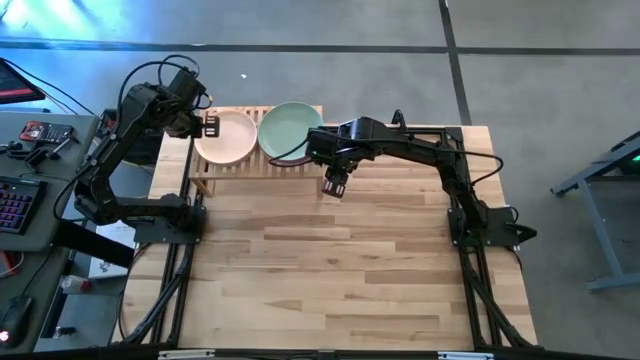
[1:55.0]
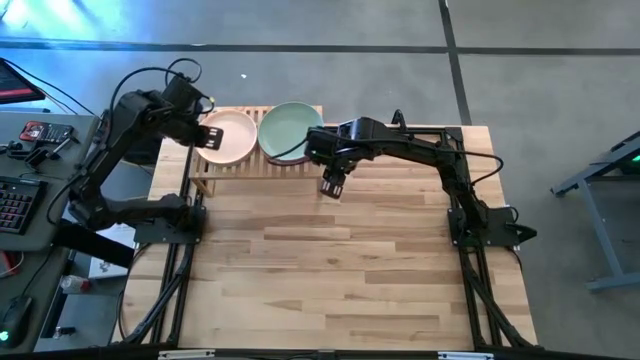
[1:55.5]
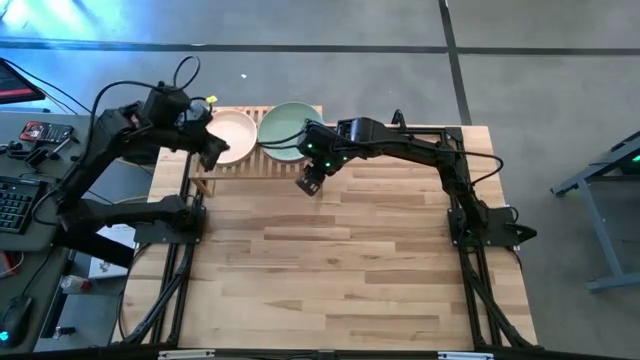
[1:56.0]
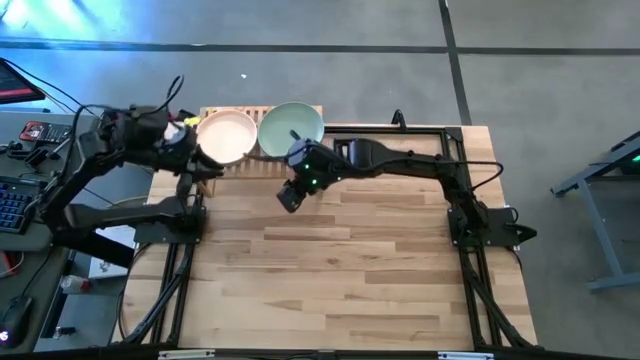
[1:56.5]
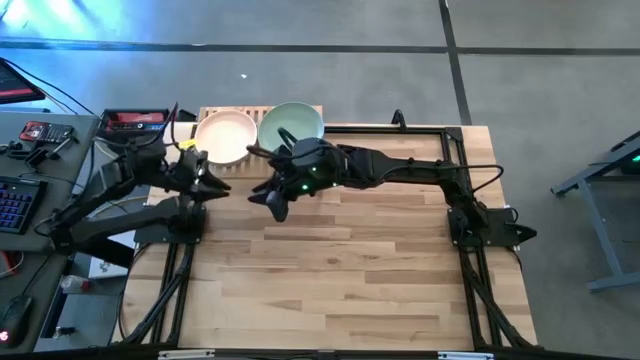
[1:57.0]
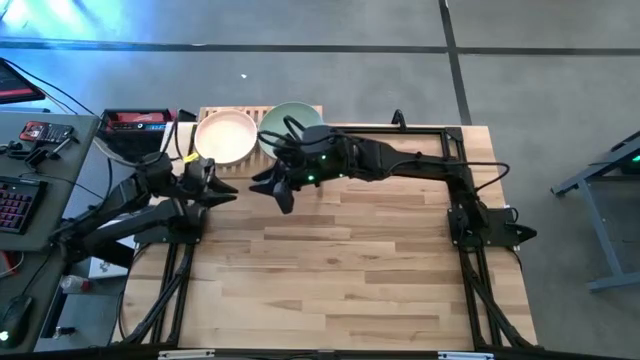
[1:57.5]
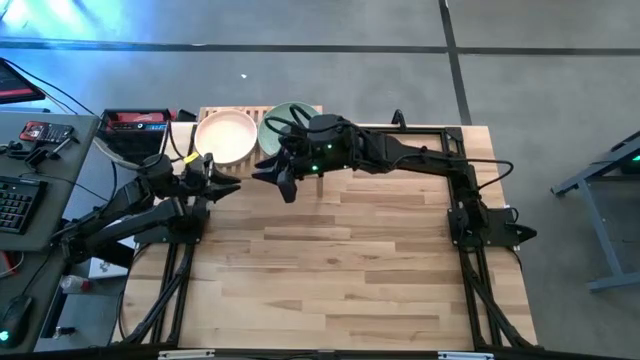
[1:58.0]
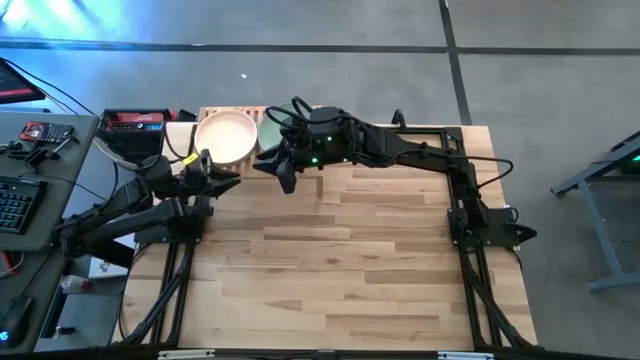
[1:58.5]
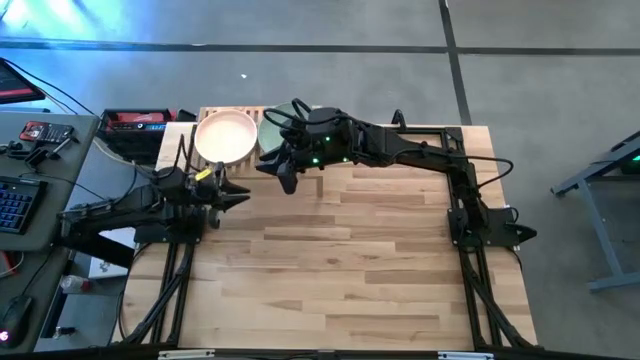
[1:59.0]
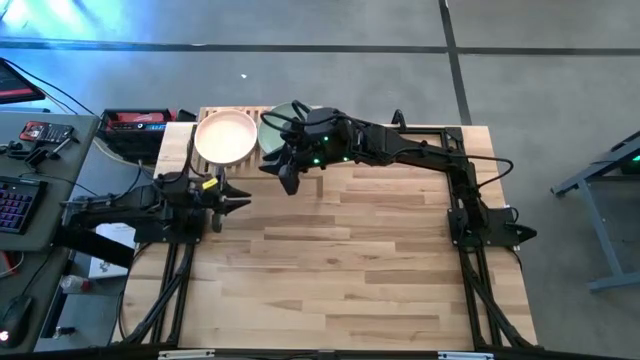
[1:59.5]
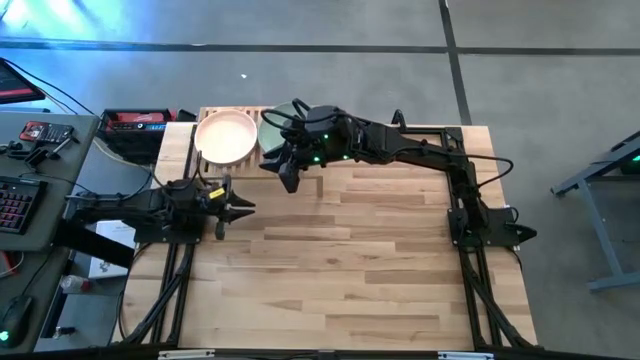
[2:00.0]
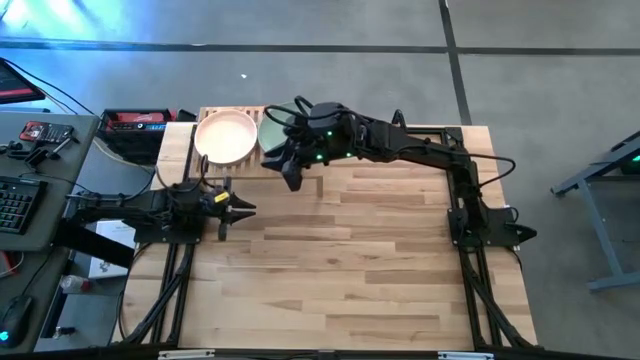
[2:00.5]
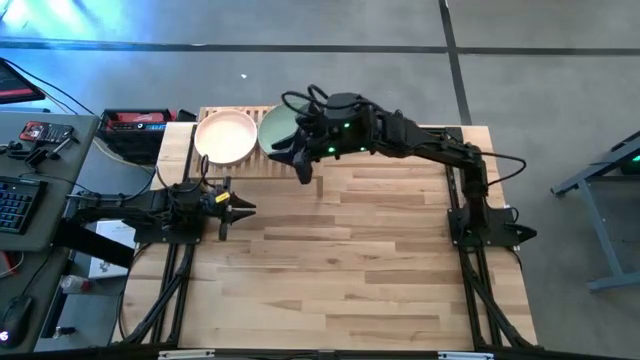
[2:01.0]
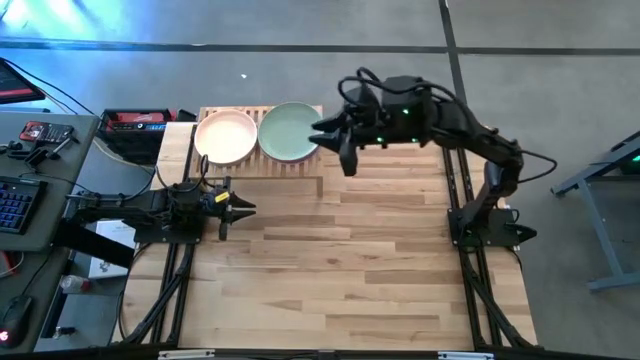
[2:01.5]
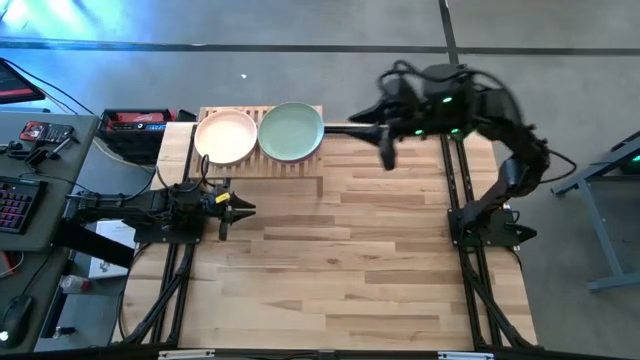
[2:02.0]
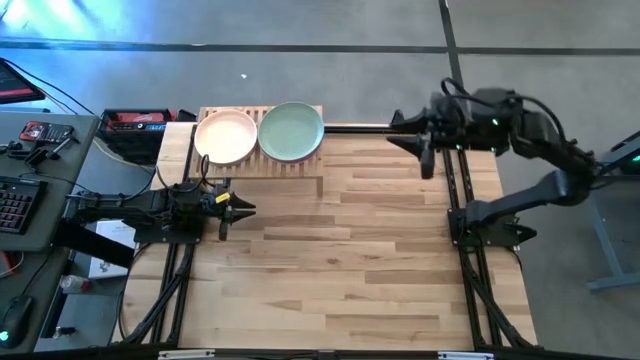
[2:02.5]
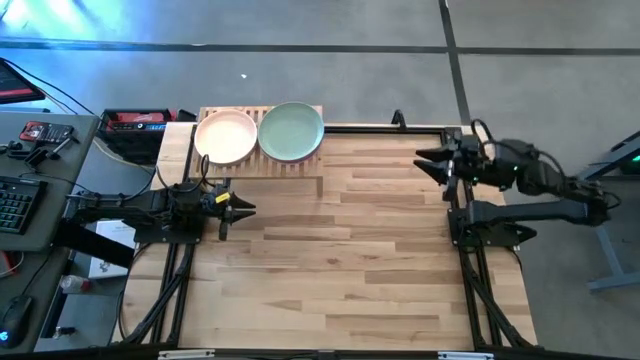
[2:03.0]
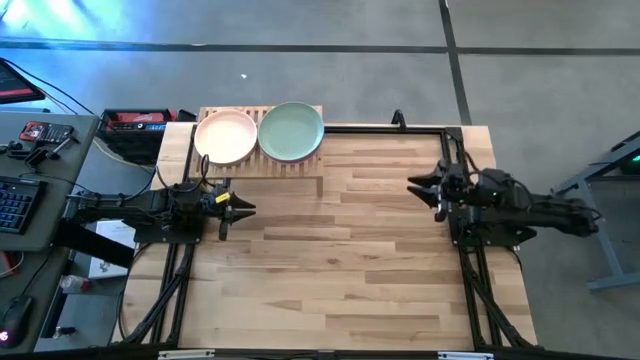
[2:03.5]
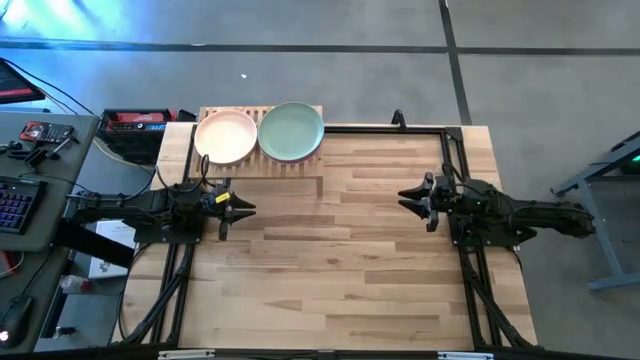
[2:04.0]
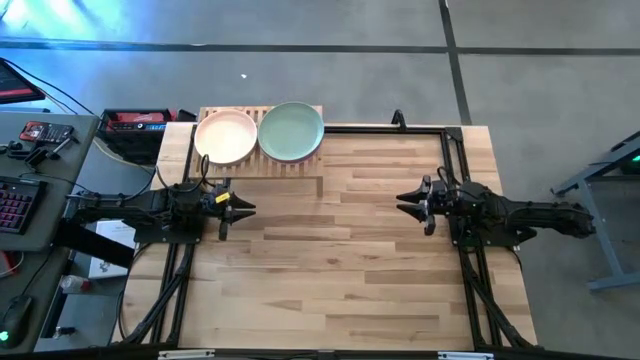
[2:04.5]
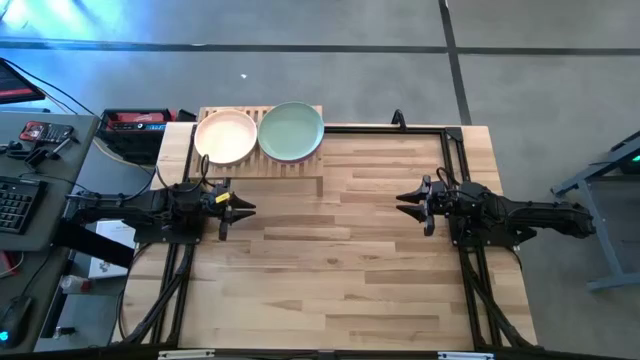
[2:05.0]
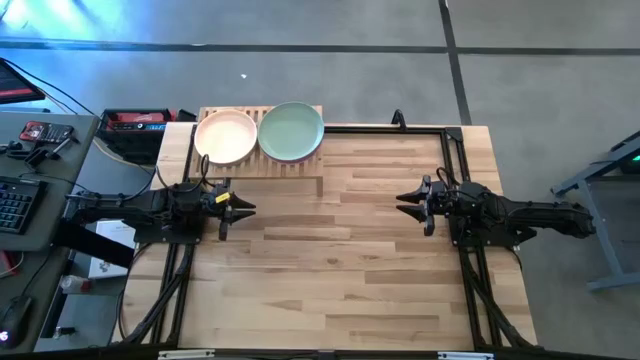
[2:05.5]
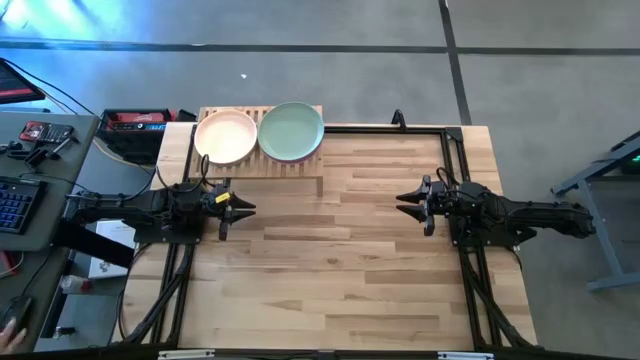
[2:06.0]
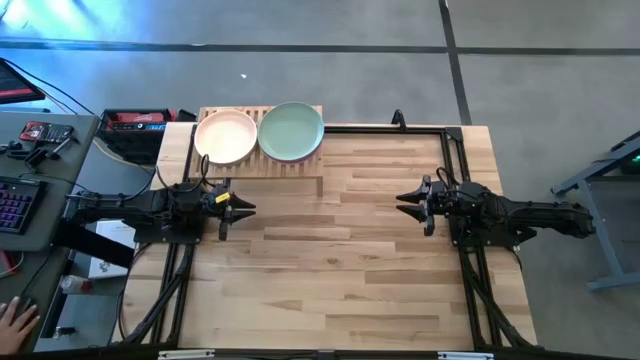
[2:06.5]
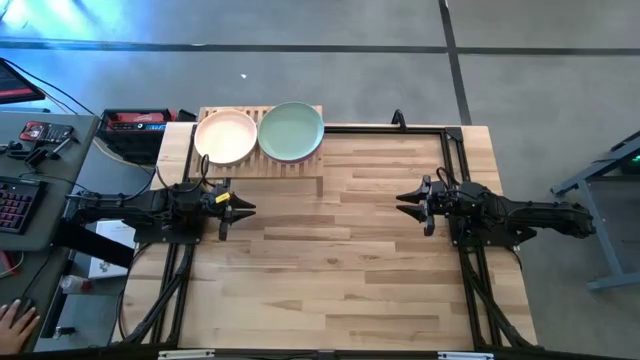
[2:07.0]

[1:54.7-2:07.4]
Task: Place and stack plates onto a shelf
Return to Home Position

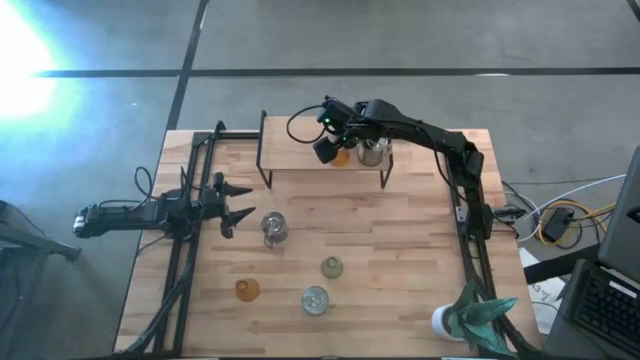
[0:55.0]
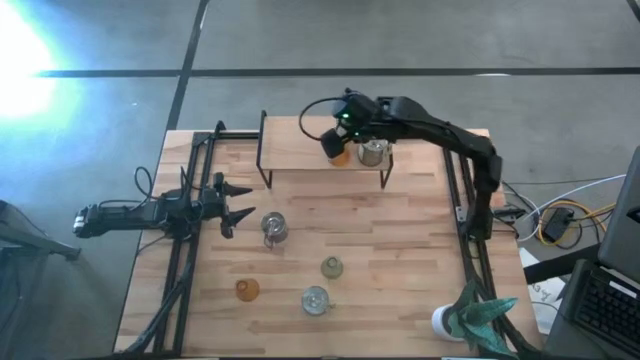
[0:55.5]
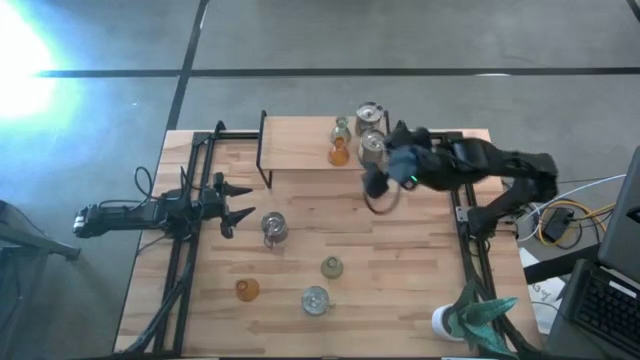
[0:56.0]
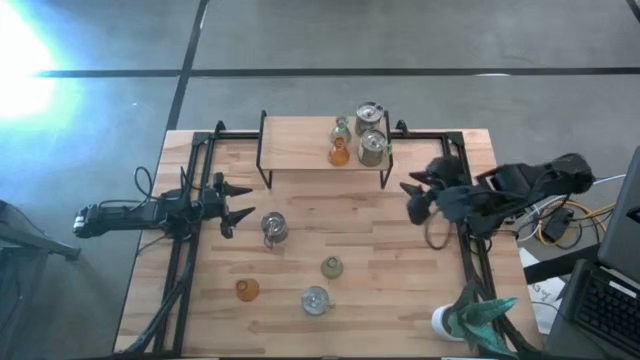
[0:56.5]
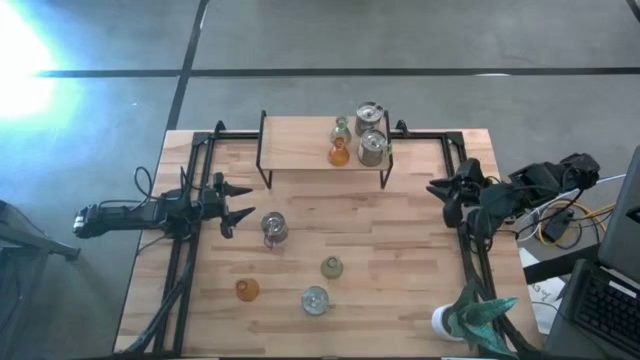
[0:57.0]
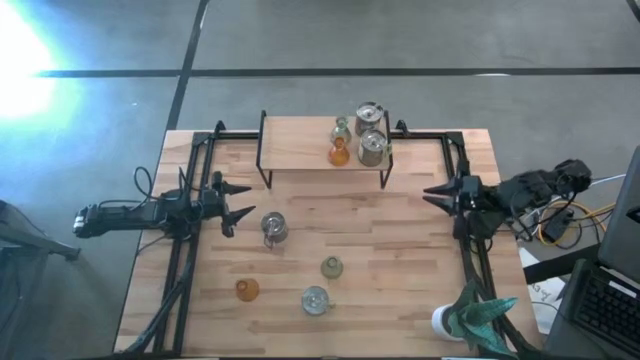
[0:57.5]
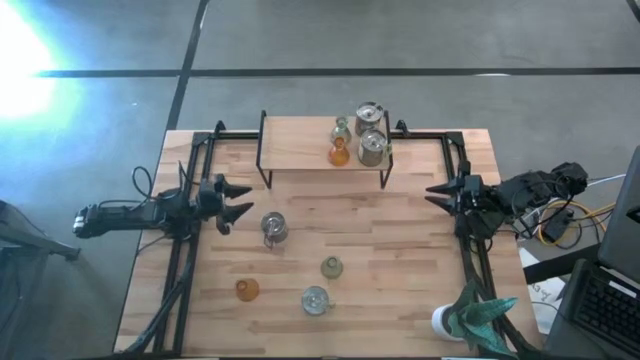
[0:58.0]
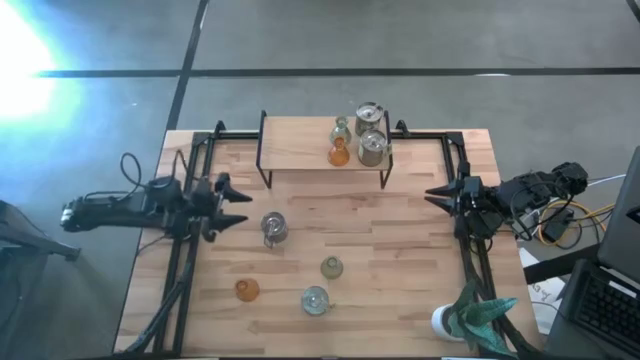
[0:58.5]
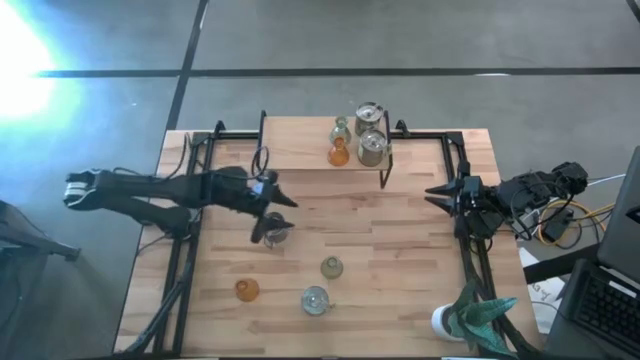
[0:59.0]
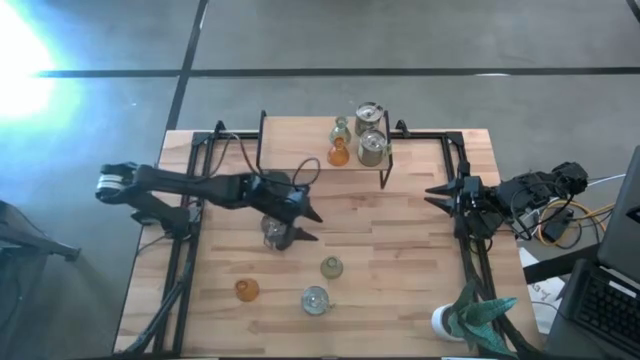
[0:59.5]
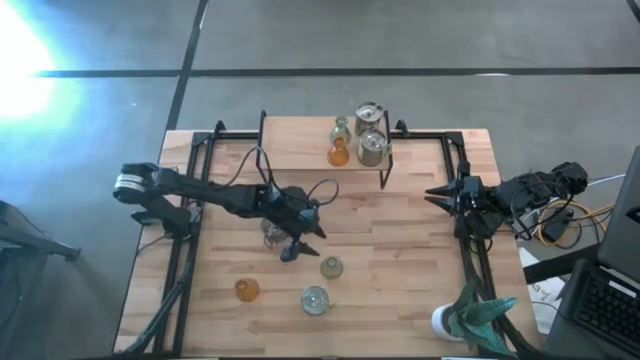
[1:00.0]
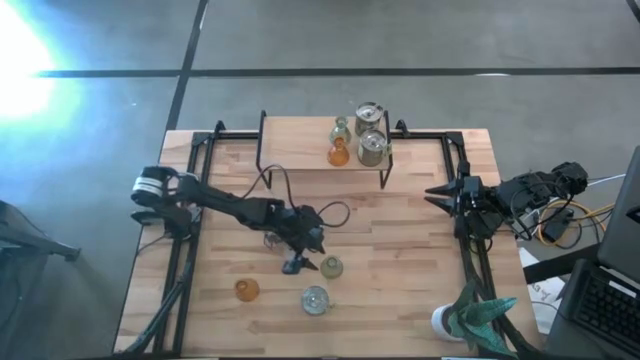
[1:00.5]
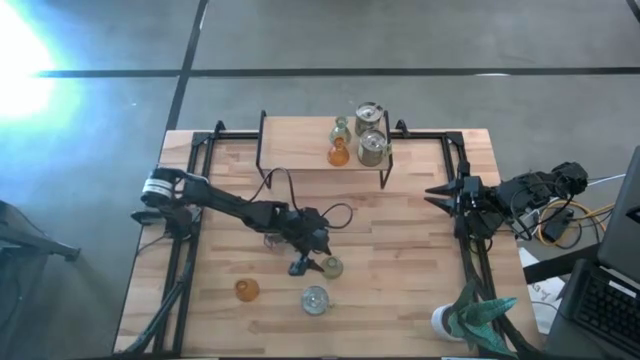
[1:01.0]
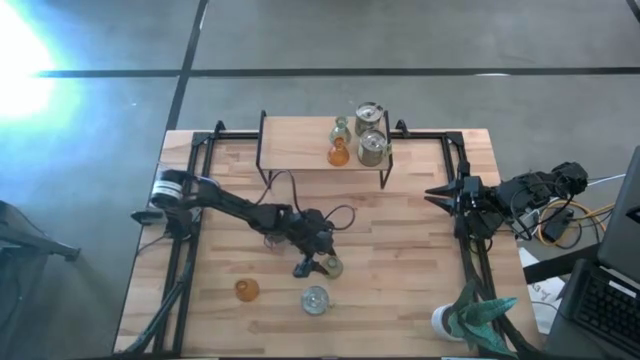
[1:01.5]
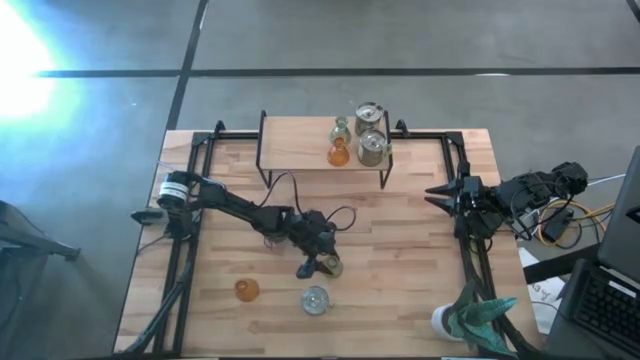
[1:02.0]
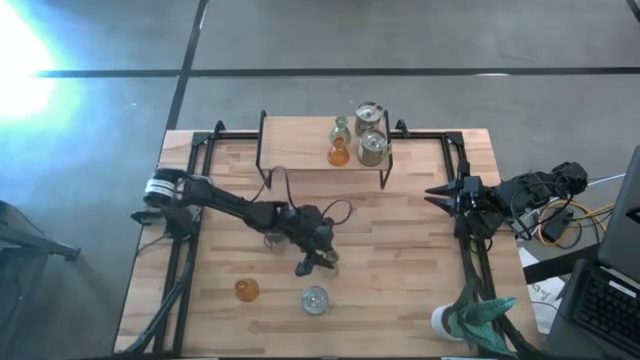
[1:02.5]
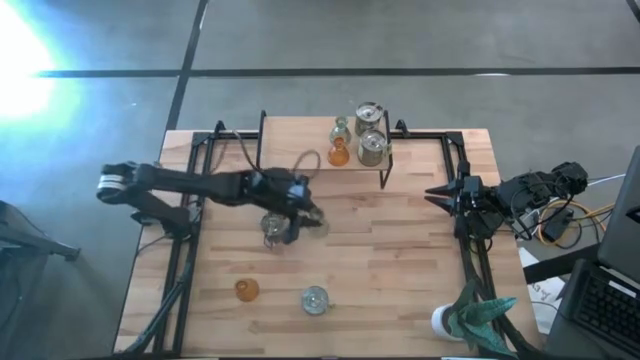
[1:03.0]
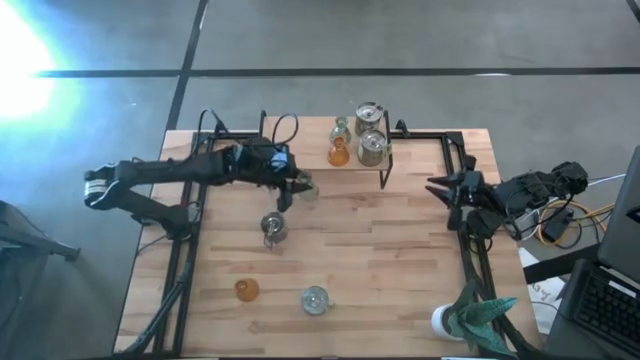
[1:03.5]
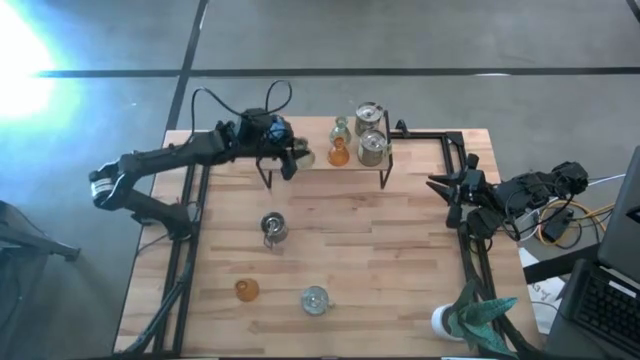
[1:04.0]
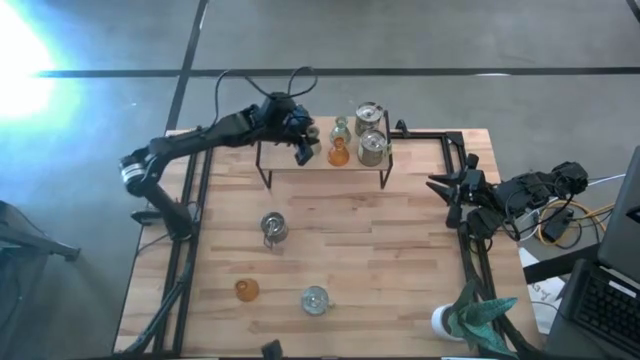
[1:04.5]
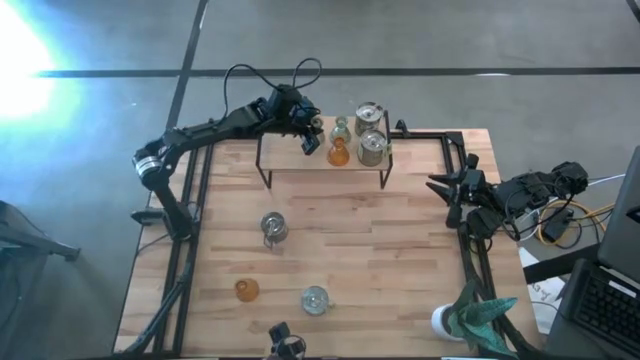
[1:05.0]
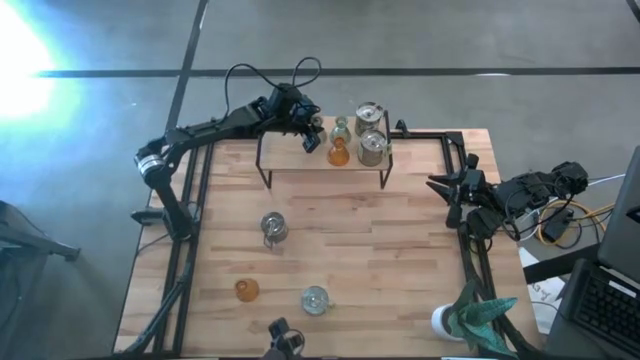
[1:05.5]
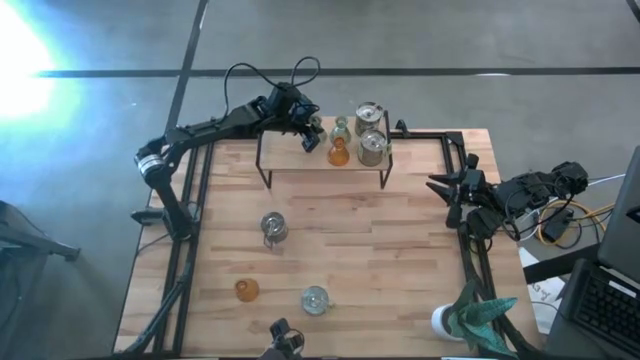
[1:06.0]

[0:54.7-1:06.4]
Task: Pick & Place candle stick holders
Put the green glass candle holder on the shelf
